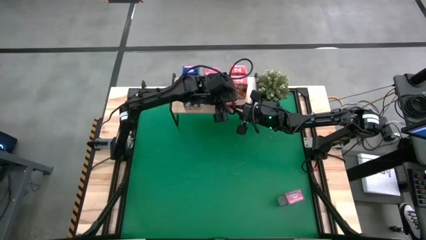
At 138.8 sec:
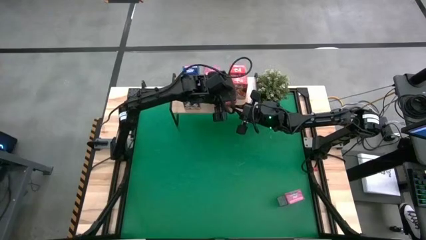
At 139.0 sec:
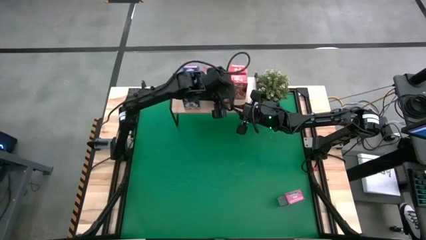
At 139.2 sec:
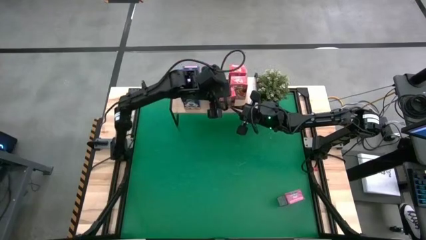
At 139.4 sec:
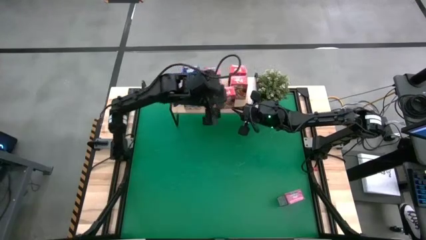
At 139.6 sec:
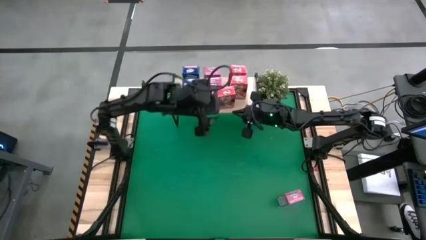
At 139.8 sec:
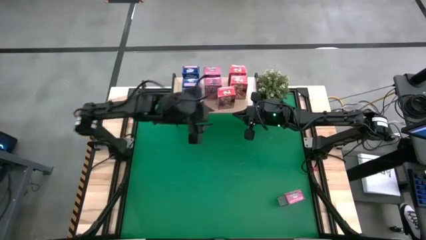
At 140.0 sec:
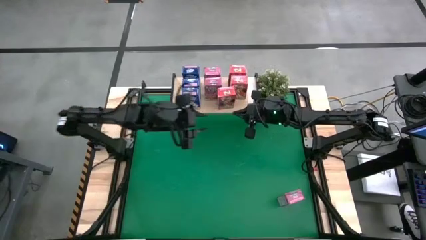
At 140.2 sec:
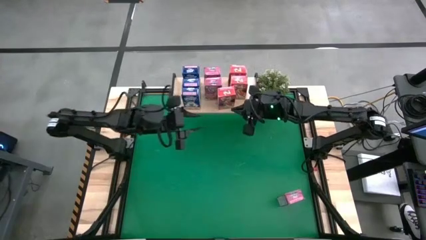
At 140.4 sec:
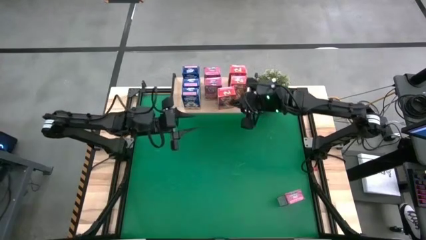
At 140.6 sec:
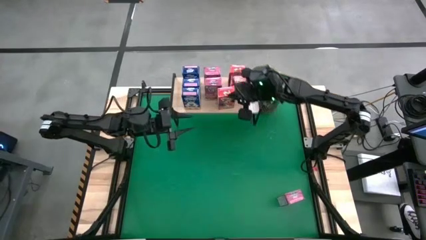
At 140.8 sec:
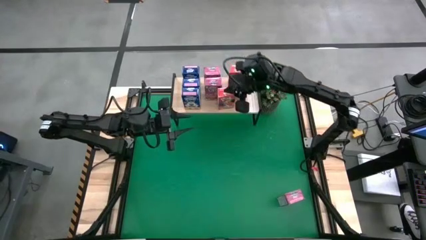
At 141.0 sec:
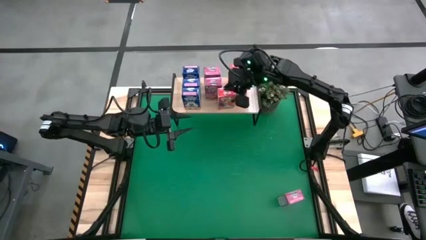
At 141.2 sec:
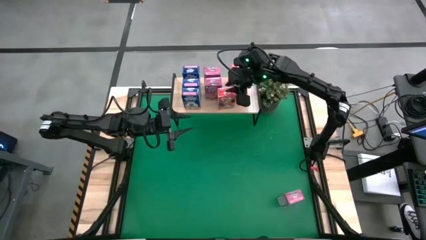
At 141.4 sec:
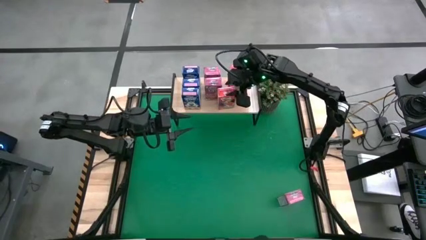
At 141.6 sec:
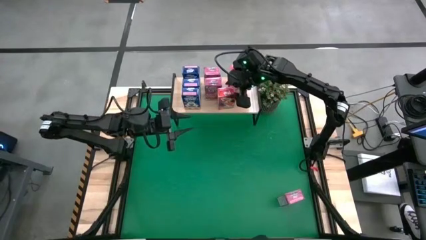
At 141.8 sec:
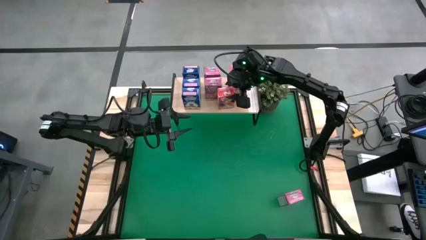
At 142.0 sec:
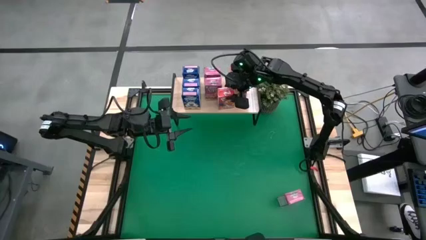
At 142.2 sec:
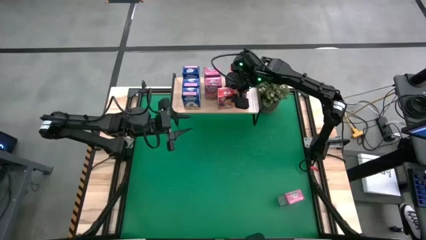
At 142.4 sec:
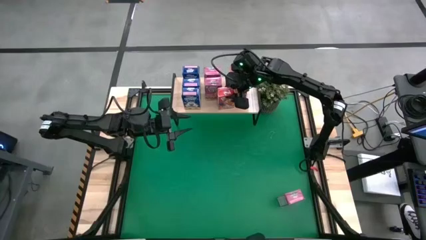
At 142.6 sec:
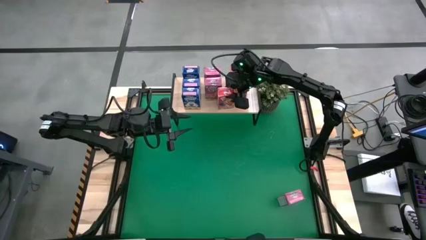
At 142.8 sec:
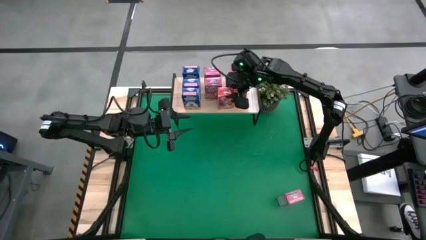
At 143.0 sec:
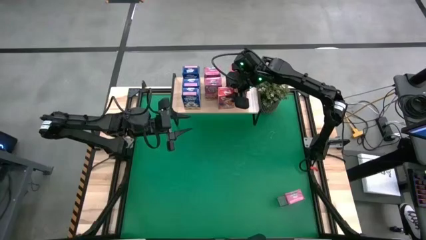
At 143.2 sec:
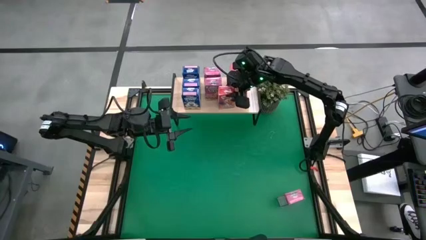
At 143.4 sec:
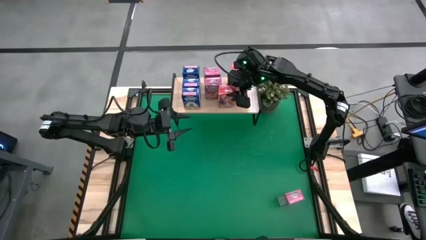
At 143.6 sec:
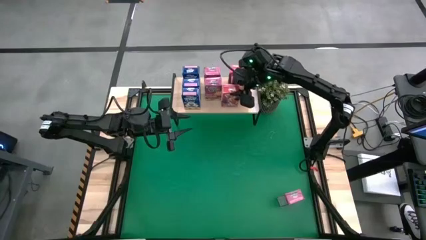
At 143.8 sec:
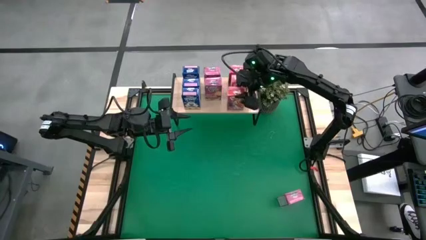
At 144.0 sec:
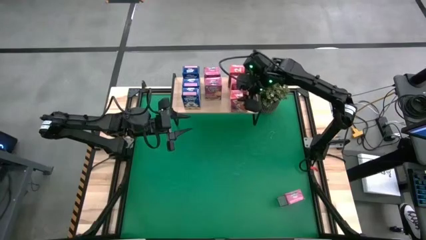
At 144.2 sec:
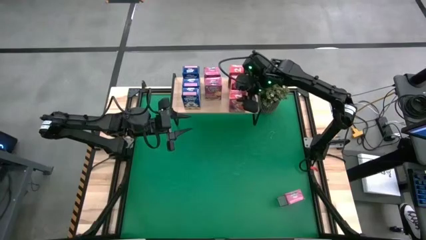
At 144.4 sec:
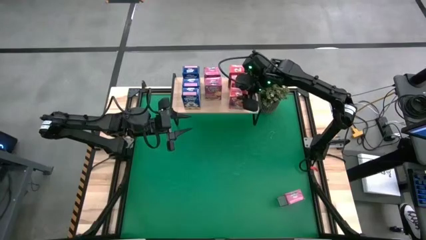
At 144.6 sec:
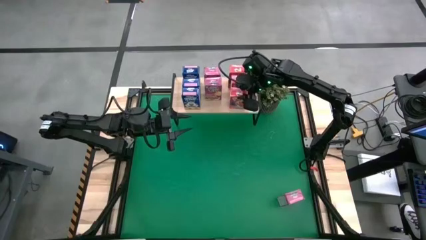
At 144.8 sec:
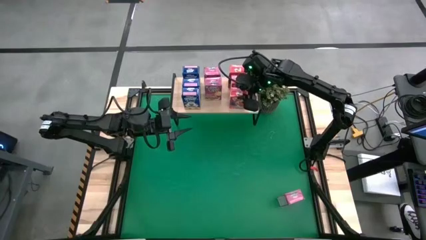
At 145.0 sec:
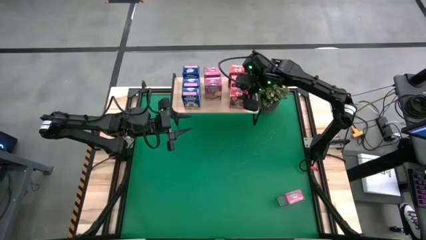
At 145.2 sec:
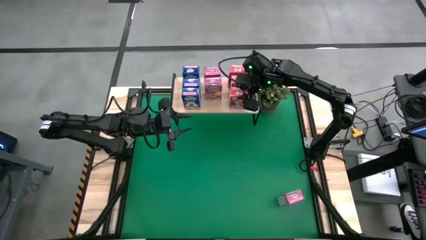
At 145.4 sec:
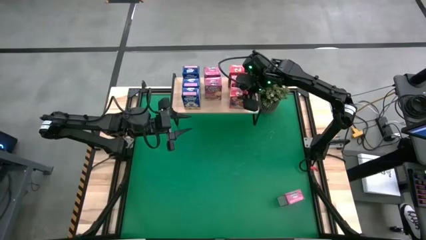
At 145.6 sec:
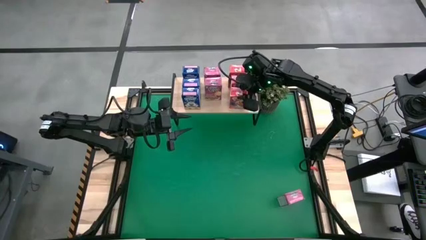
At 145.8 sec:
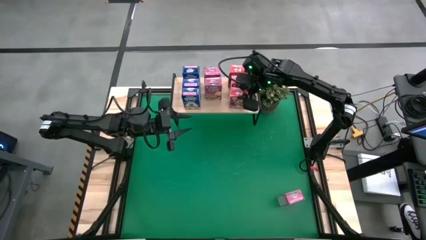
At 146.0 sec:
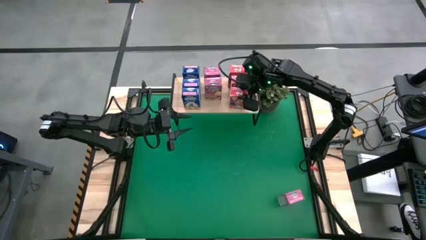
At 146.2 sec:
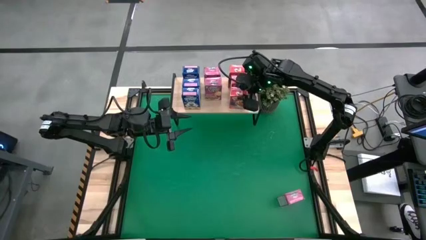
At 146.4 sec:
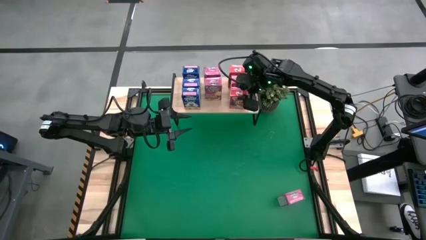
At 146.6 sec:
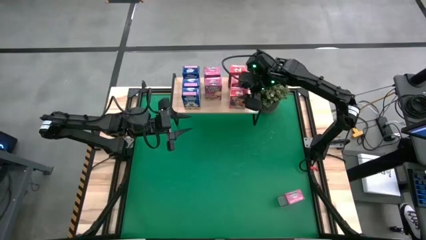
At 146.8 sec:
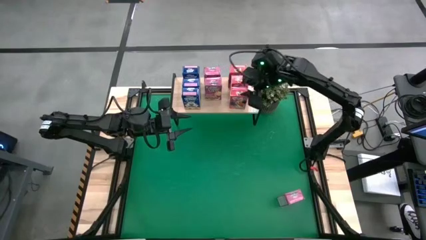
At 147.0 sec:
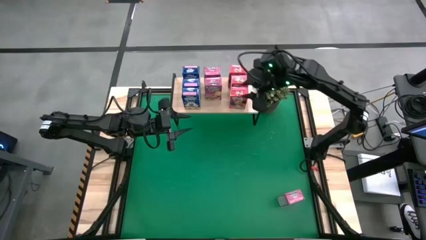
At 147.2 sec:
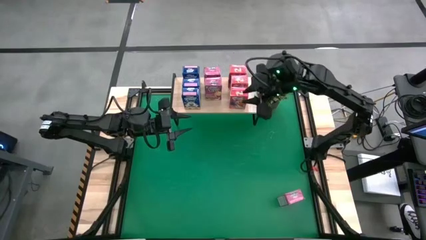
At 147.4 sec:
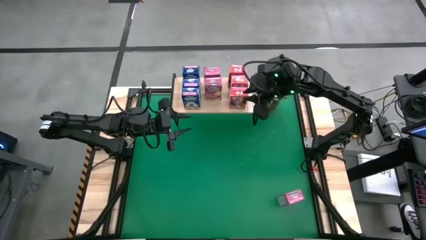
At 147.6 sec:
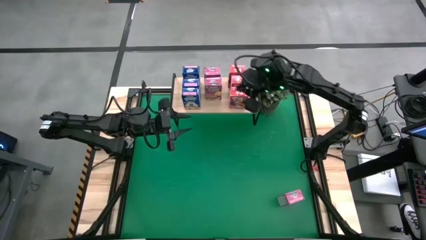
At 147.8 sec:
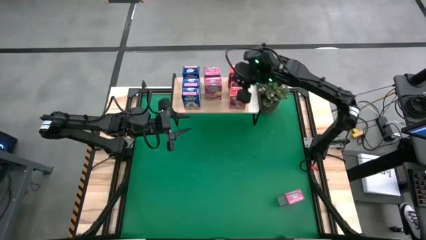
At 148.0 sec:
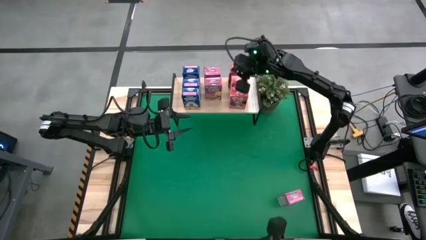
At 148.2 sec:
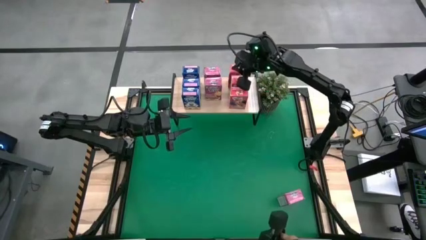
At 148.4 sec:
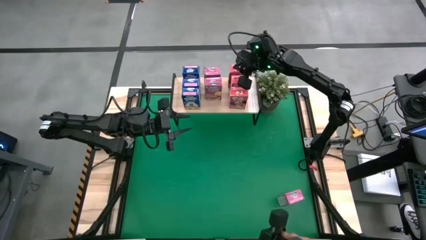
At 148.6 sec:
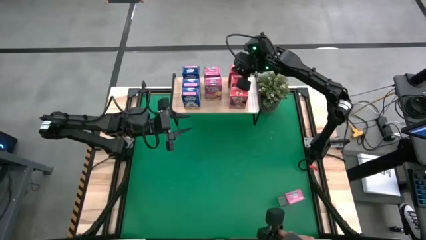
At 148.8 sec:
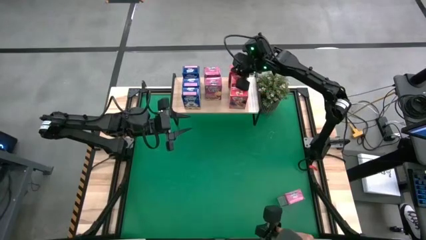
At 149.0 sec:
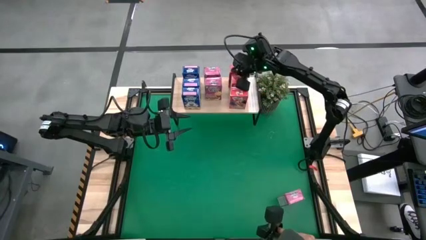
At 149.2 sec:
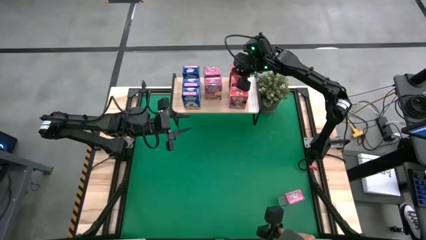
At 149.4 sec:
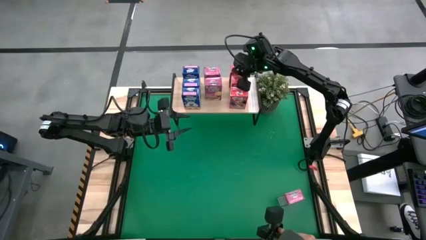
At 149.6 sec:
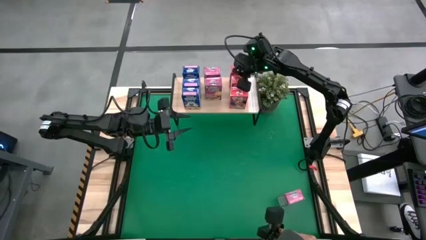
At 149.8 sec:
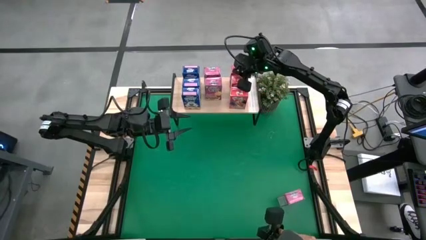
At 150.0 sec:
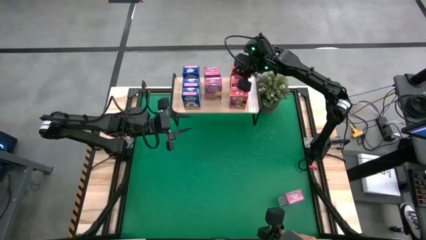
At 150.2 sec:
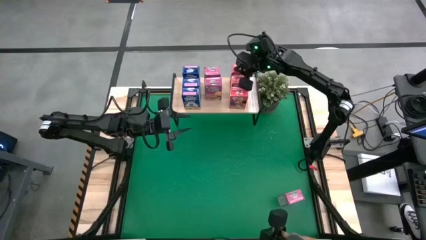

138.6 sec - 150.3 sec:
Task: Stack cereal on shelf
Put the red cereal box on the shelf aligned with the red cereal boxes

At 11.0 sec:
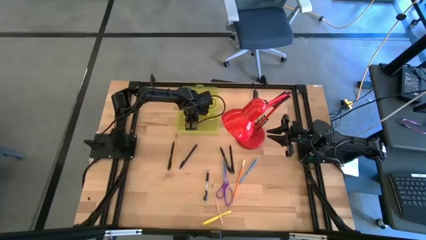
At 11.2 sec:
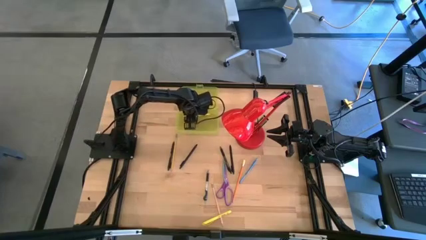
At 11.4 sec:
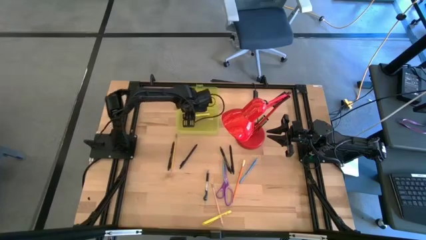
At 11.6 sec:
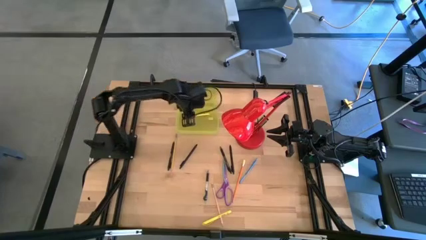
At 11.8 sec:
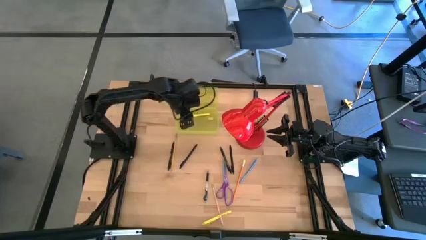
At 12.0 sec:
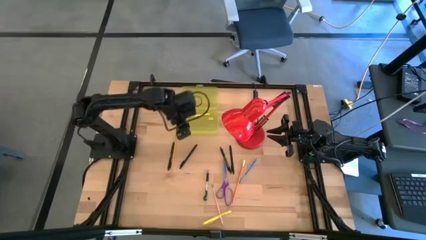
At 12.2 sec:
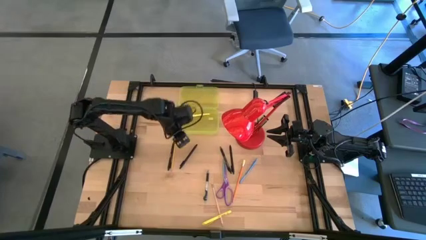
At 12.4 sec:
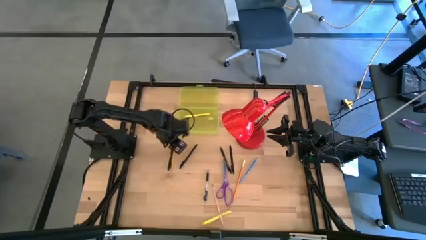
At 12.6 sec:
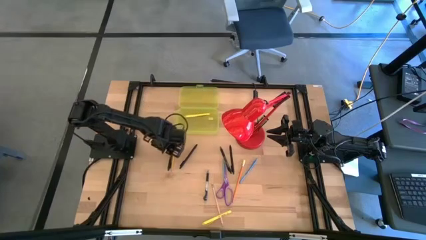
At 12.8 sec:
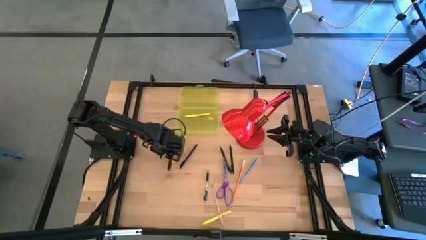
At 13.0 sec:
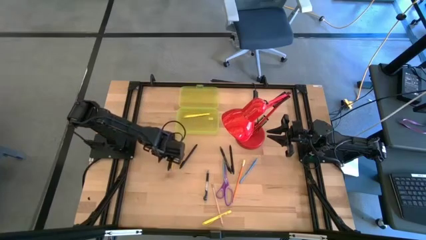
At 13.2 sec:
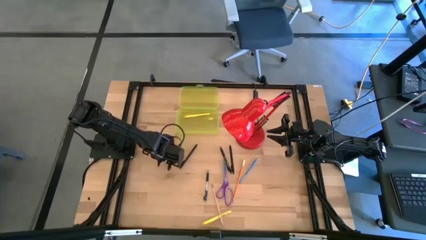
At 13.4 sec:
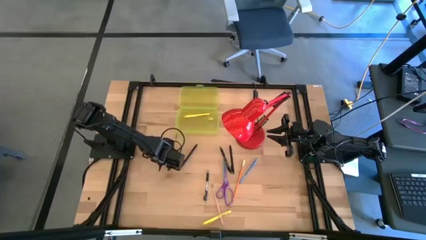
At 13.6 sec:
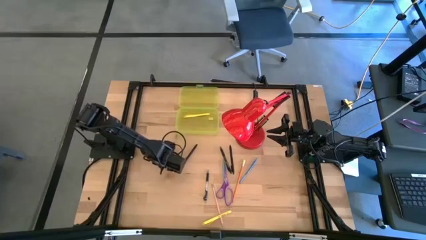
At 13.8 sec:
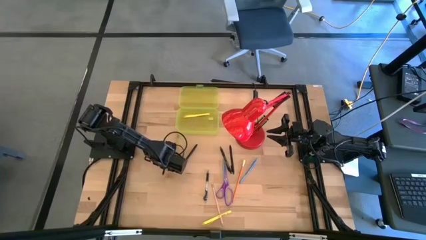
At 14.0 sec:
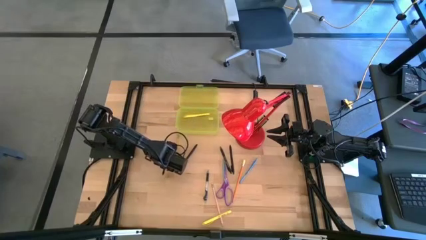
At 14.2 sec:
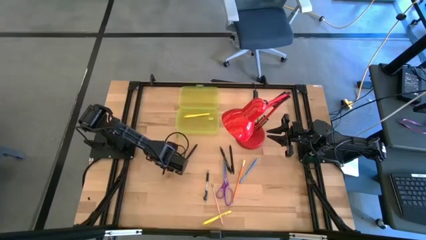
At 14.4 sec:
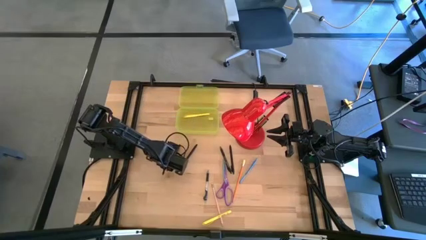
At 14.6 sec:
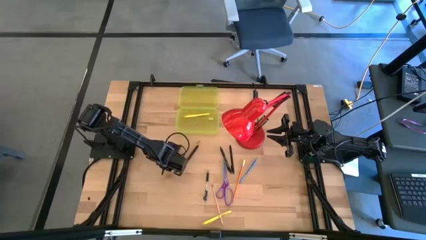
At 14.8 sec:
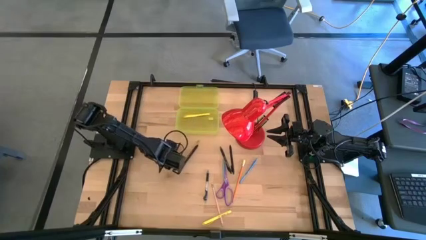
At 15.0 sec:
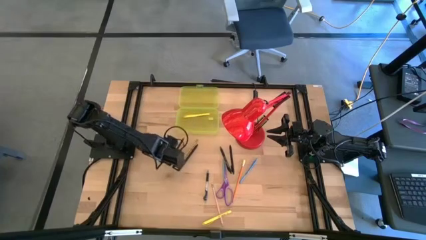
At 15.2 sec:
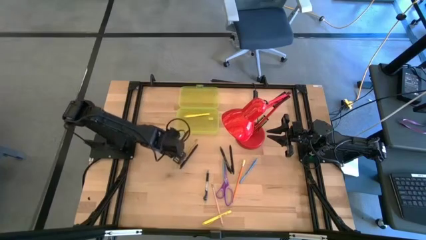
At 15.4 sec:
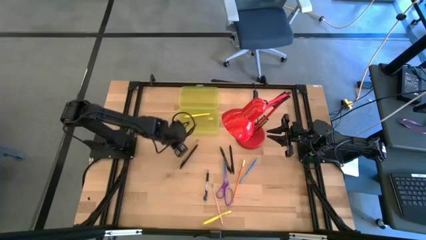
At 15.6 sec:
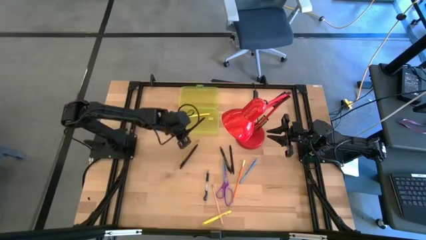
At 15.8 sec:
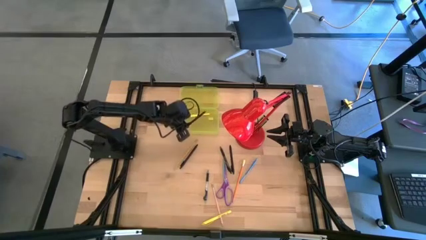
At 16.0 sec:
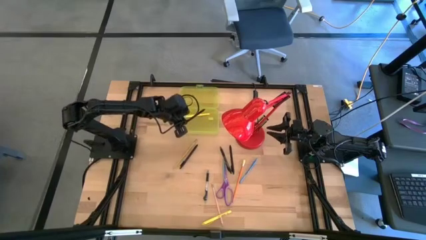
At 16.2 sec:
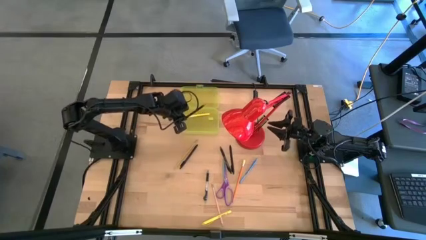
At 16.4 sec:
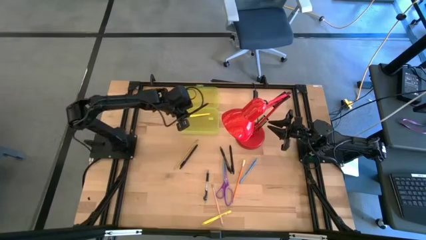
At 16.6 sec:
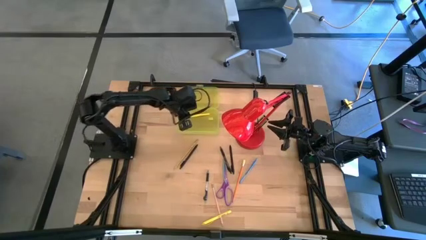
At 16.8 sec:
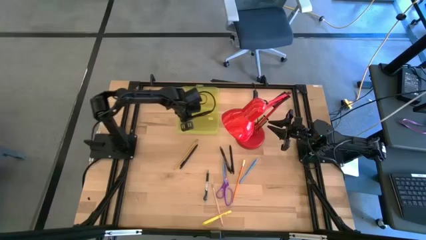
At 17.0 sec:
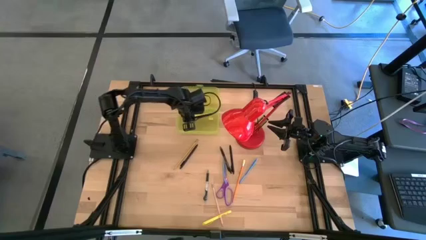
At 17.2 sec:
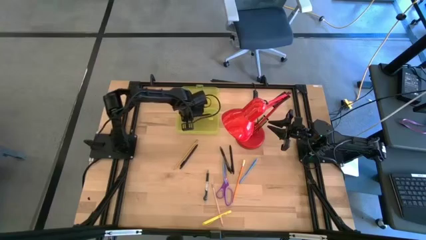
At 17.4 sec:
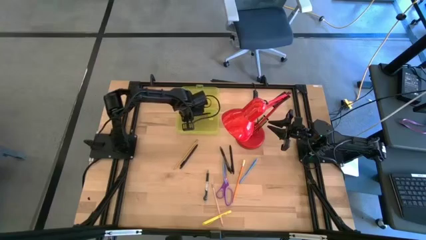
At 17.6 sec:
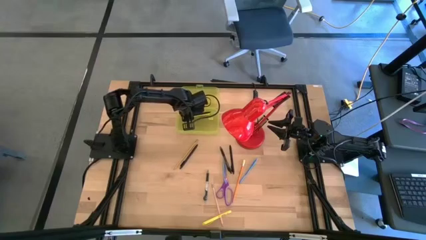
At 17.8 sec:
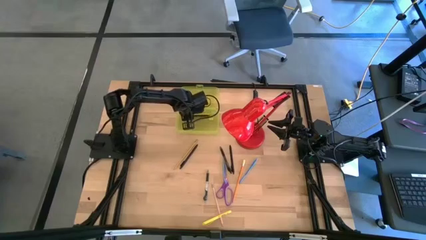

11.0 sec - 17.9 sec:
Task: Pick & place school supplies into a supply box
Put the left black pen into the yellow supply box
